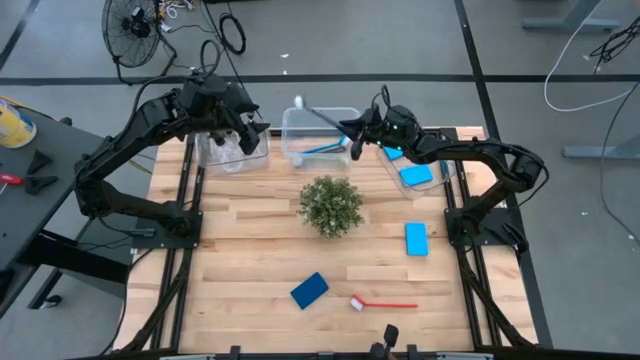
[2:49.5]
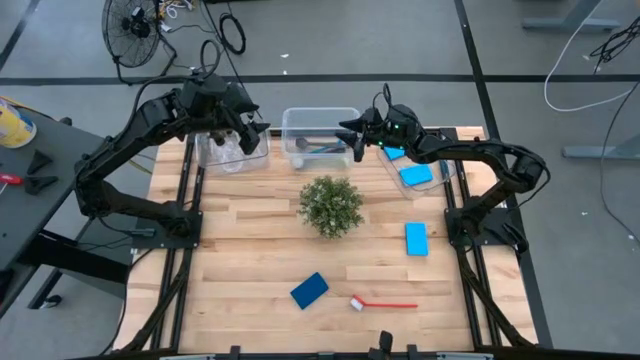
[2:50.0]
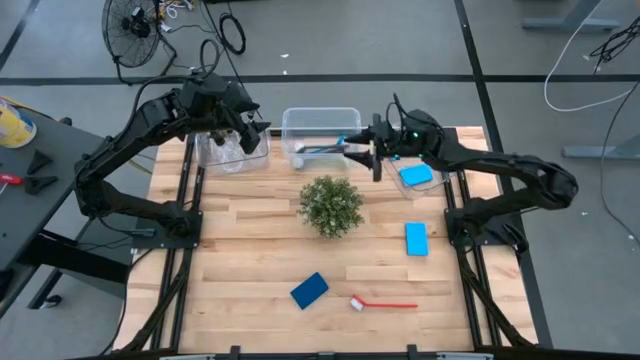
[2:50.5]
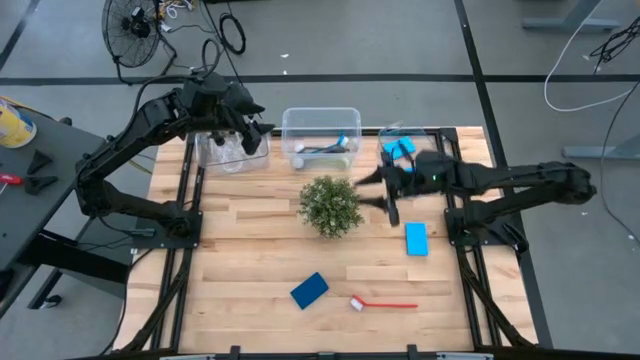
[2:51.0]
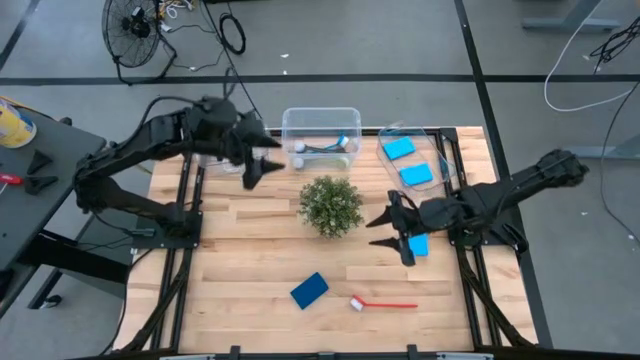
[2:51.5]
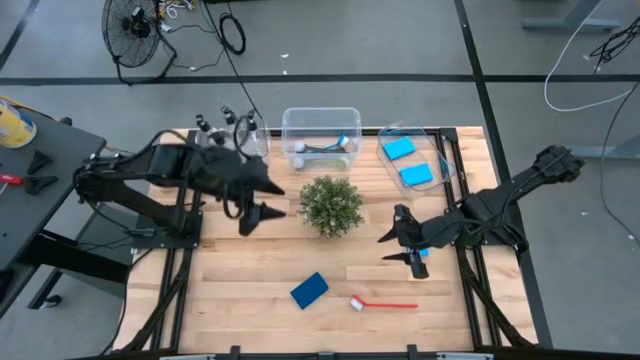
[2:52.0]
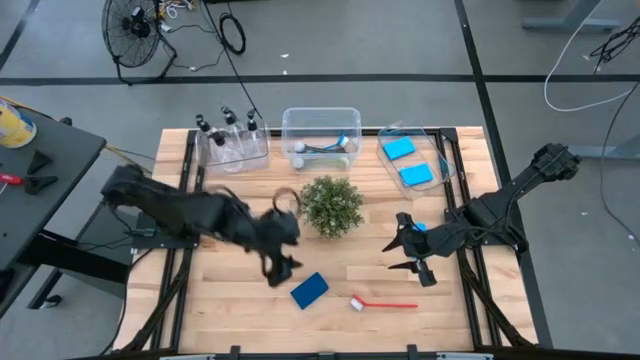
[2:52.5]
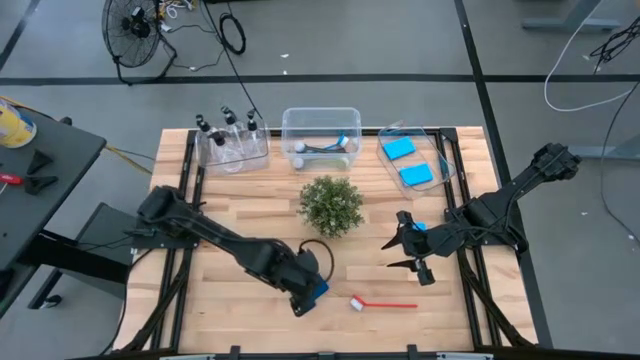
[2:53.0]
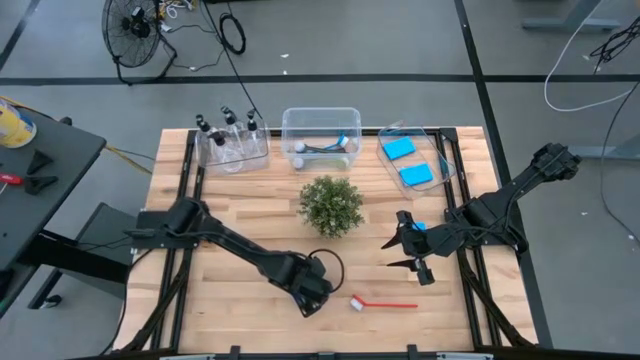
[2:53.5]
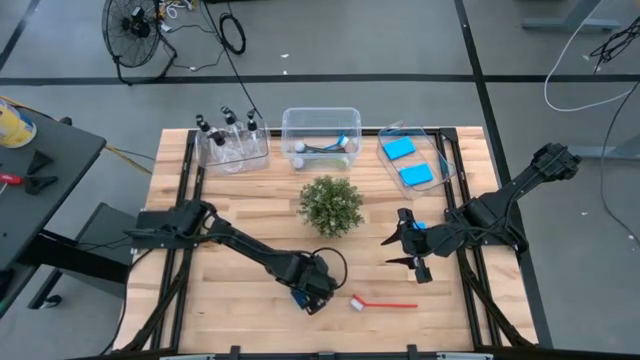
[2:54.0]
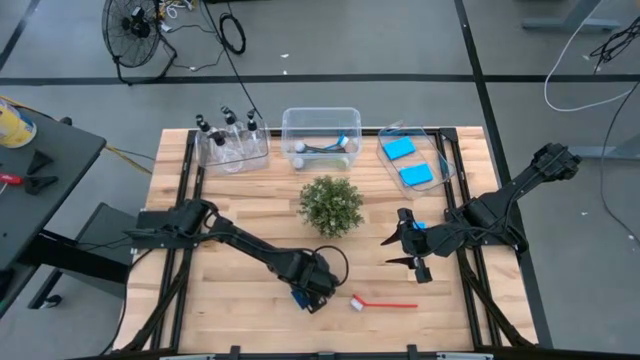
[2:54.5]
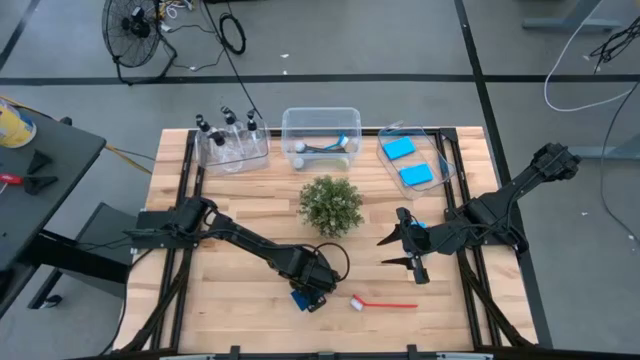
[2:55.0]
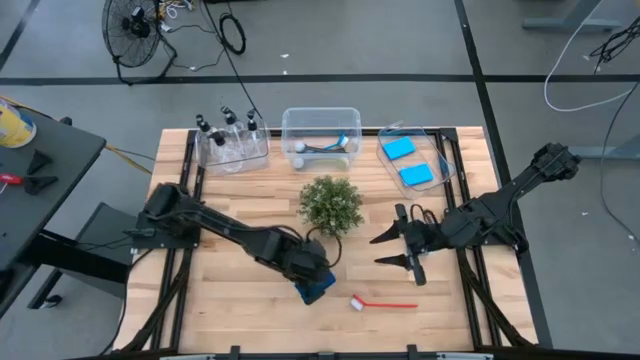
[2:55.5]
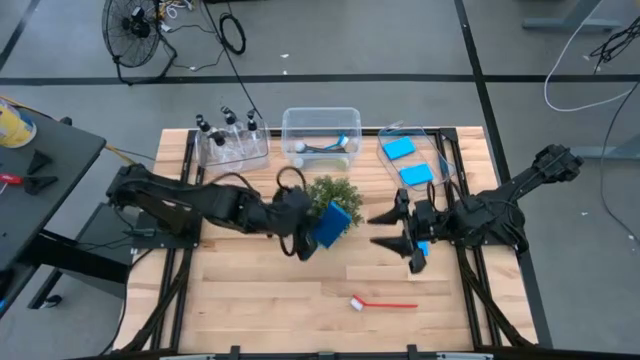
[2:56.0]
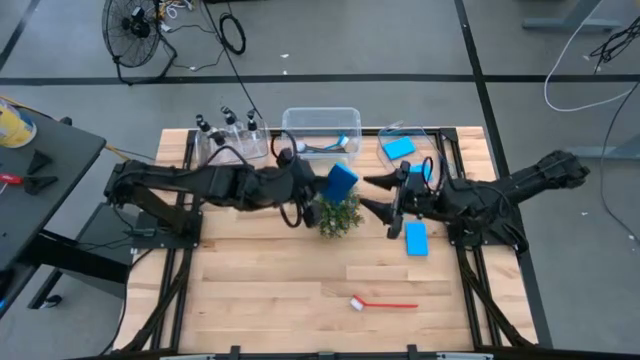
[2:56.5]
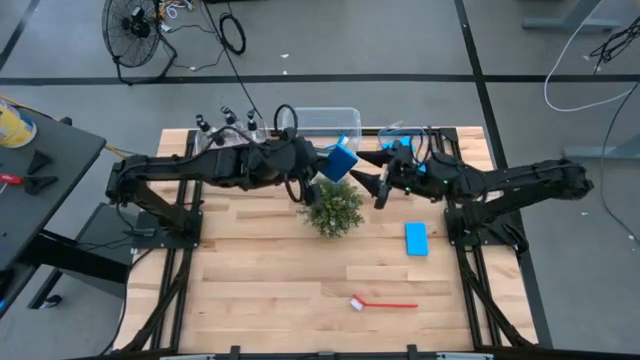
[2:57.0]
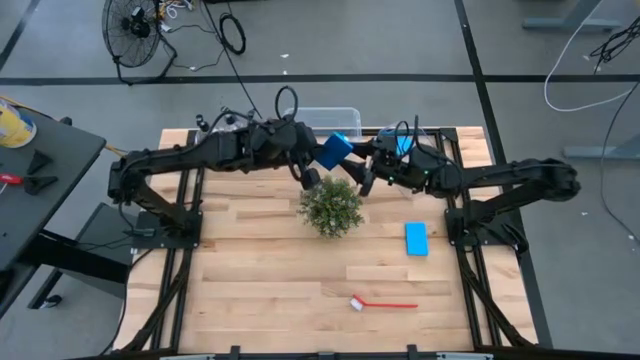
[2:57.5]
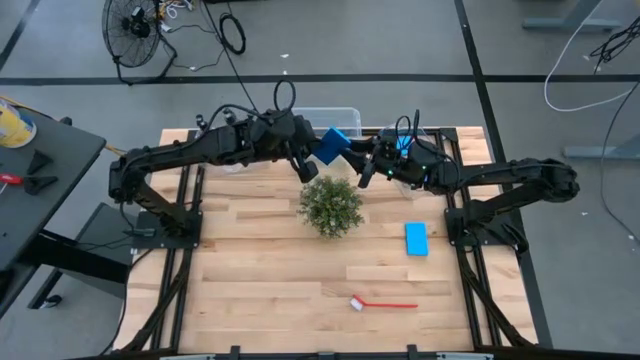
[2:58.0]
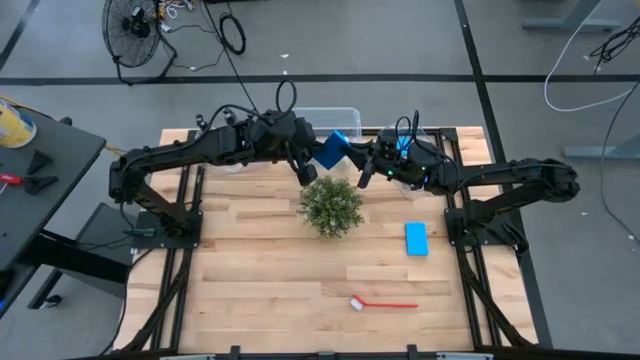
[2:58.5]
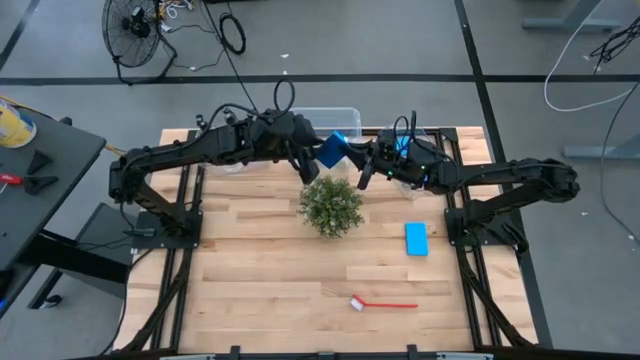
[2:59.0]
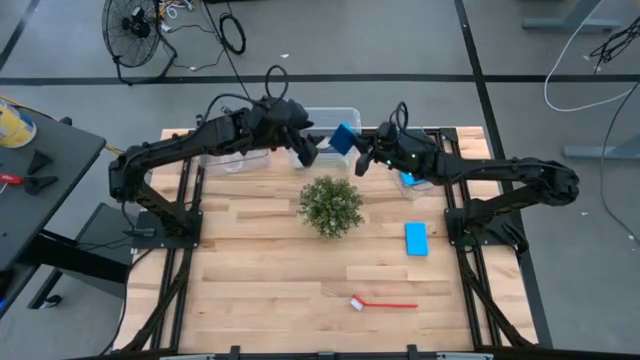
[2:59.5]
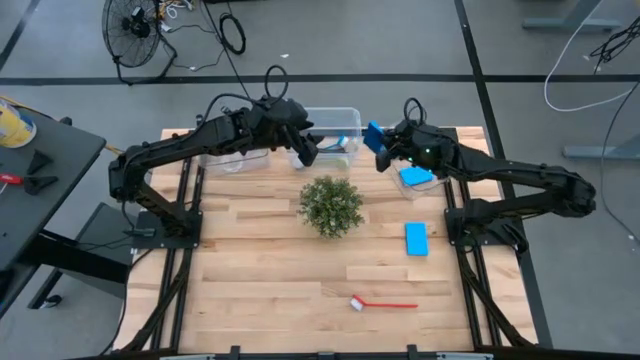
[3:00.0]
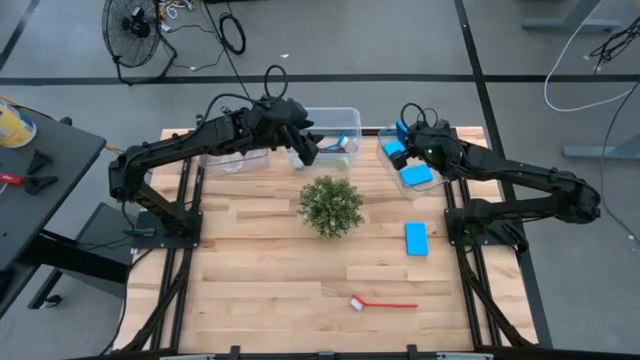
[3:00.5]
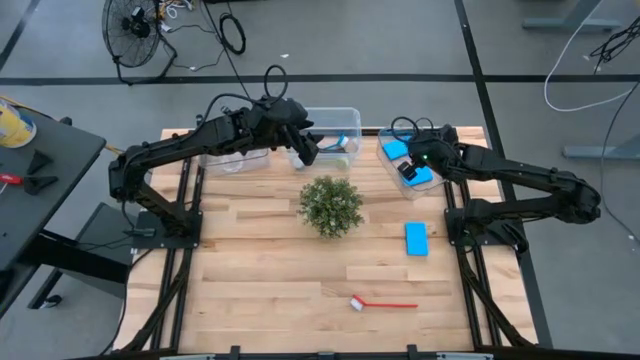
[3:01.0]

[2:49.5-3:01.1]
Task: Pick & Place Kitchen Sink Supplies
Put the blue sponge into the right transparent bin

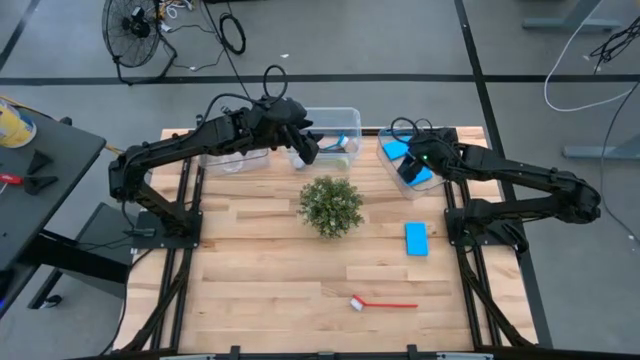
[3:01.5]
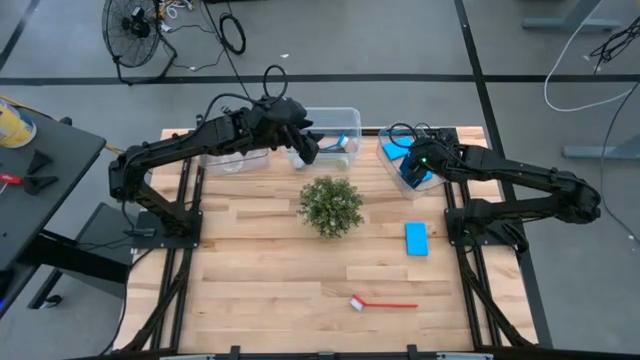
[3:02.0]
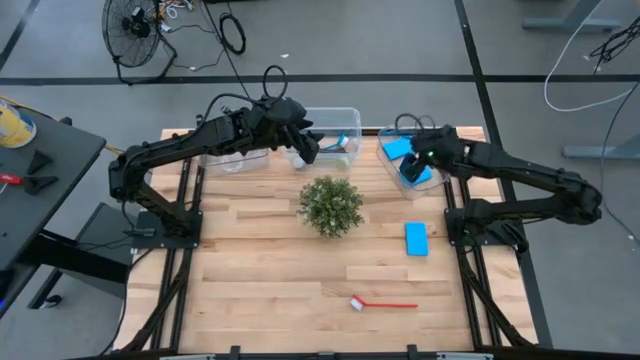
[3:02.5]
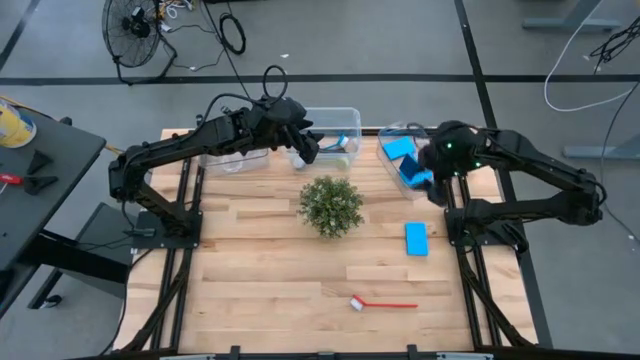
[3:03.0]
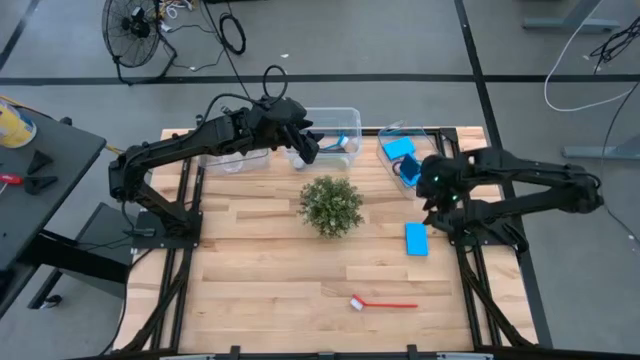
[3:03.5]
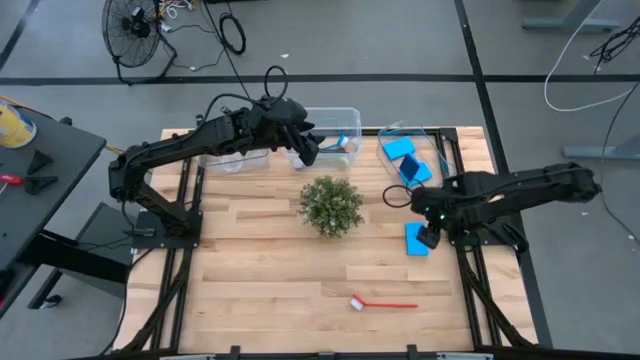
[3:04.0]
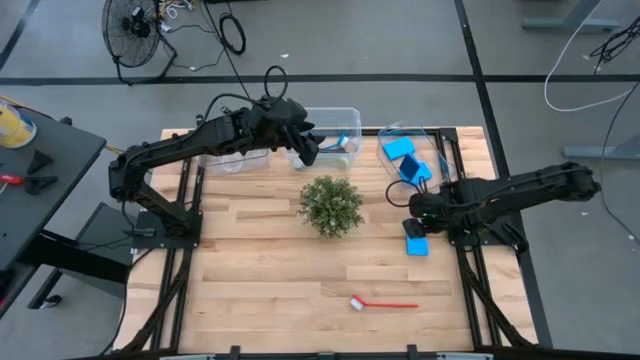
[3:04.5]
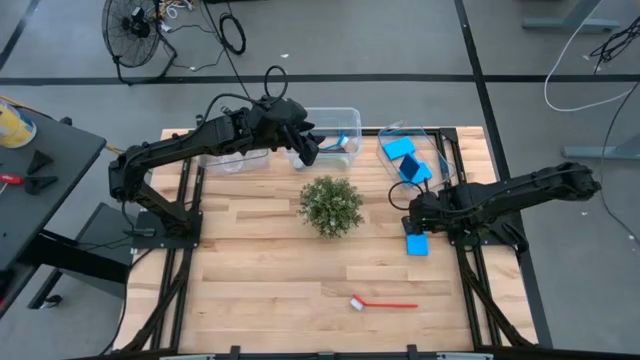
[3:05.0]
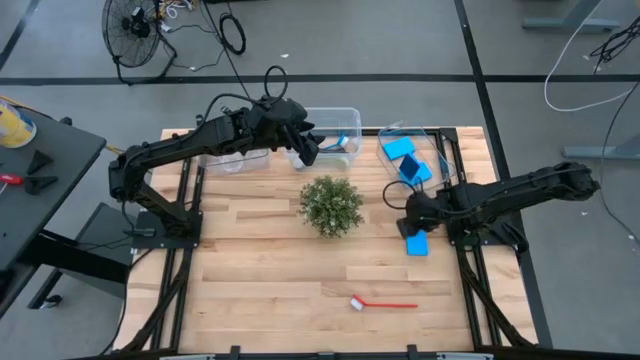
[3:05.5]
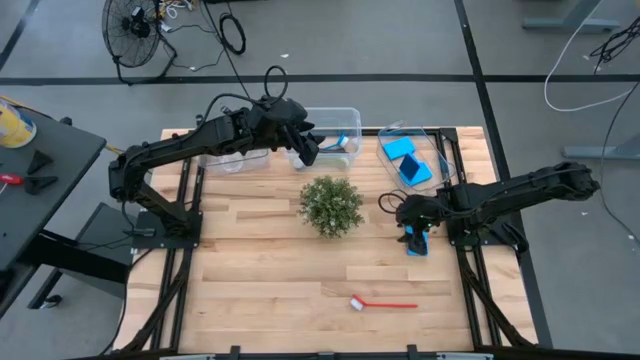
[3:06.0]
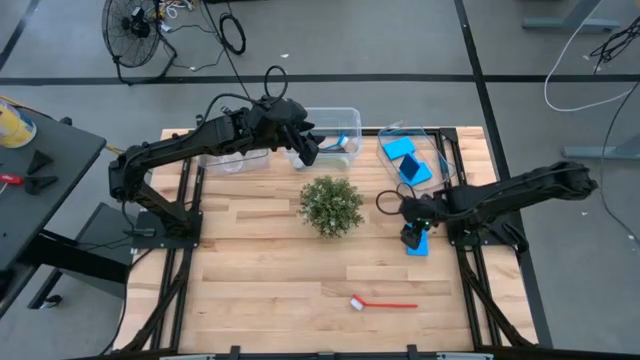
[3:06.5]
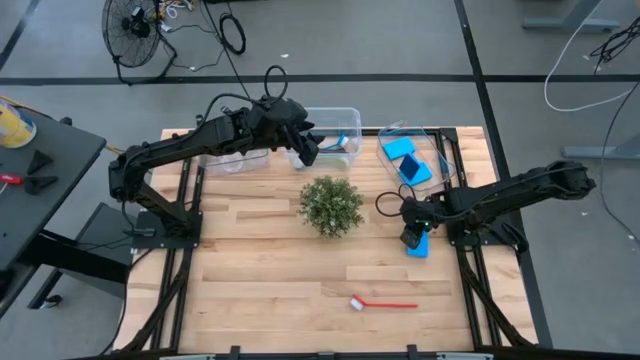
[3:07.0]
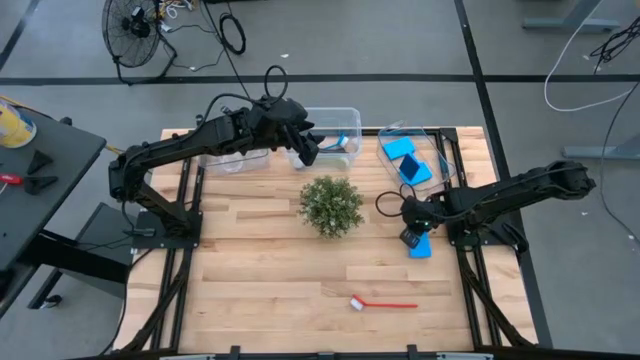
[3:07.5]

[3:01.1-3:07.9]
Put the blue sponge into the right transparent bin
